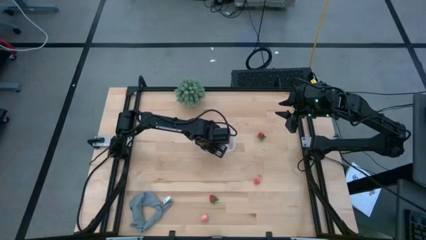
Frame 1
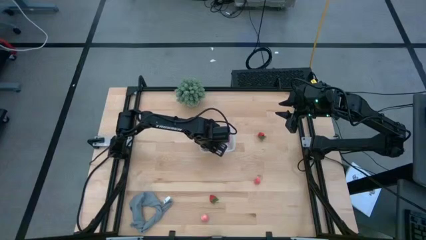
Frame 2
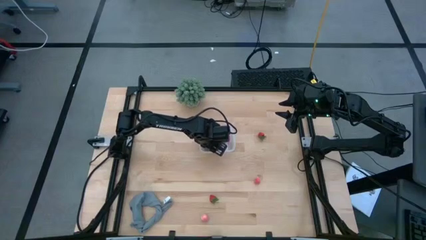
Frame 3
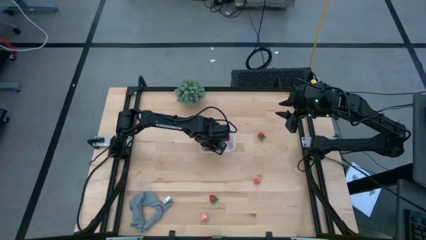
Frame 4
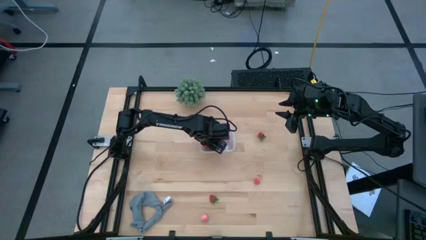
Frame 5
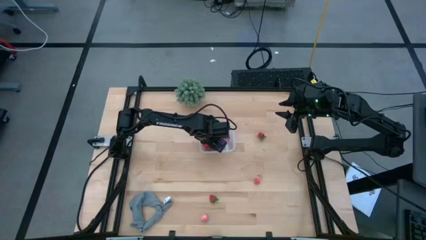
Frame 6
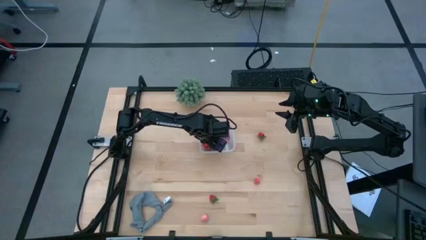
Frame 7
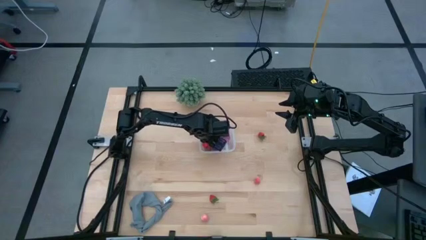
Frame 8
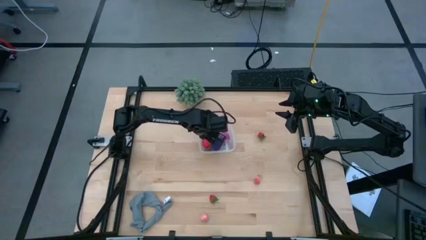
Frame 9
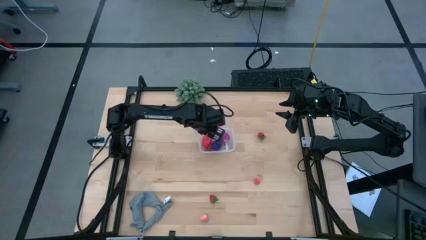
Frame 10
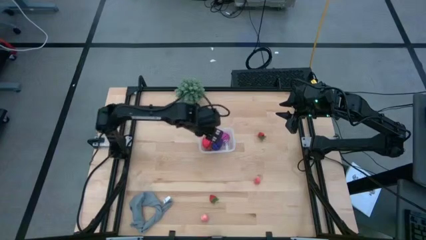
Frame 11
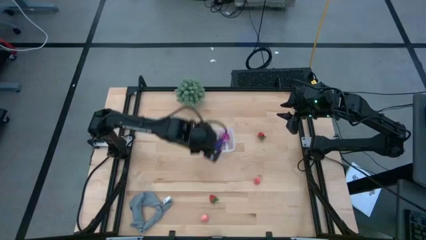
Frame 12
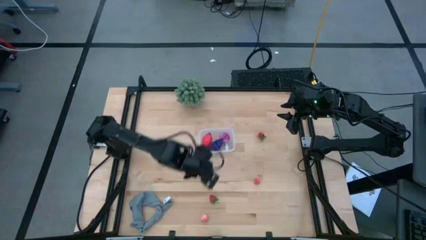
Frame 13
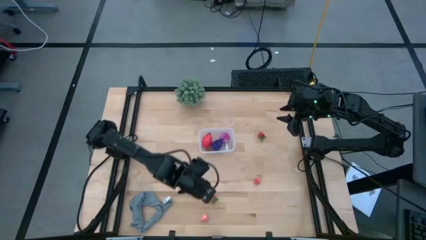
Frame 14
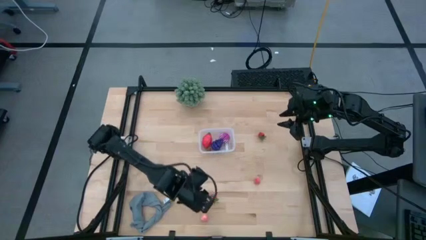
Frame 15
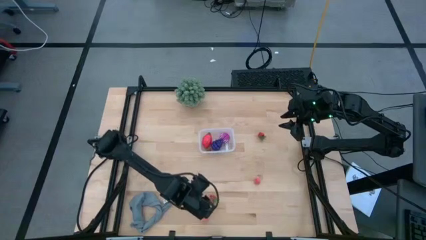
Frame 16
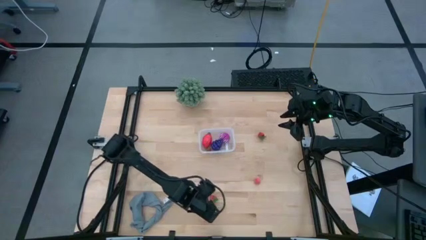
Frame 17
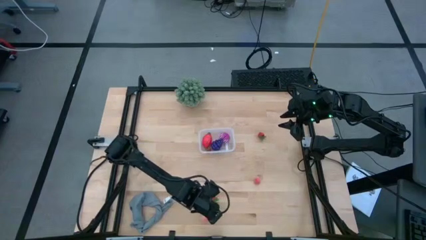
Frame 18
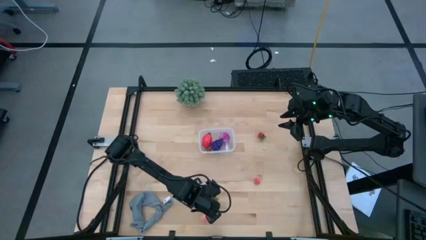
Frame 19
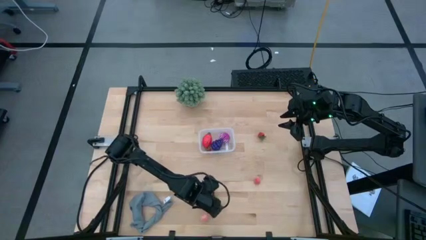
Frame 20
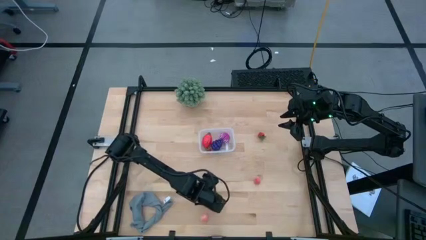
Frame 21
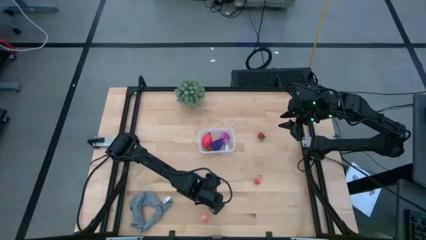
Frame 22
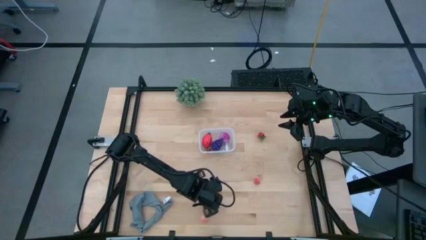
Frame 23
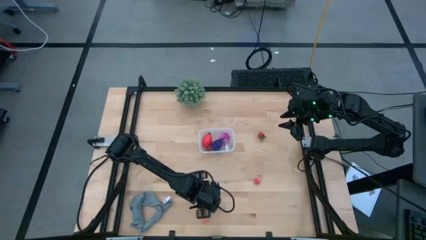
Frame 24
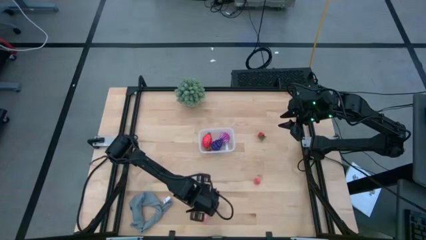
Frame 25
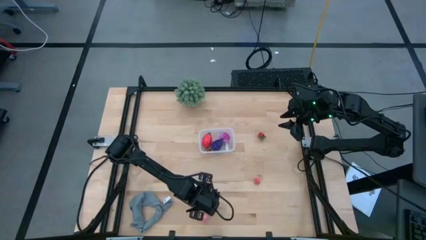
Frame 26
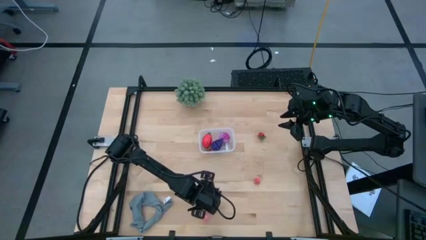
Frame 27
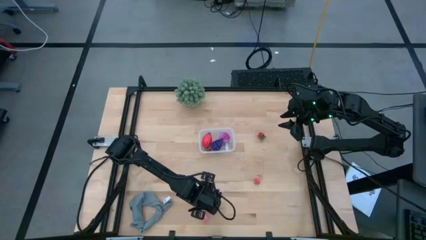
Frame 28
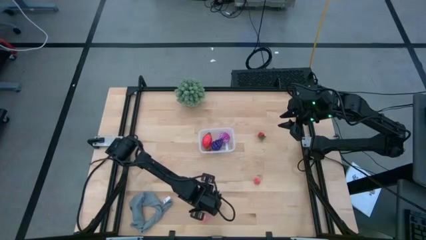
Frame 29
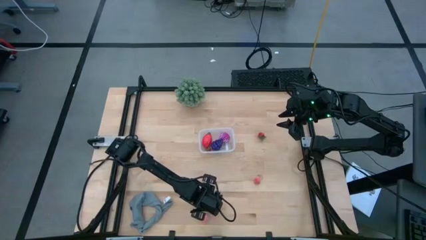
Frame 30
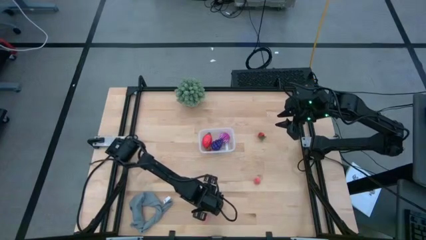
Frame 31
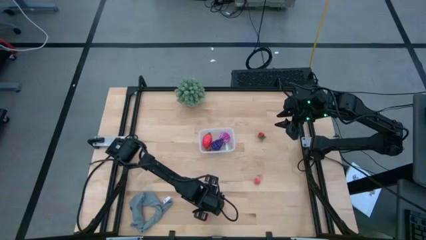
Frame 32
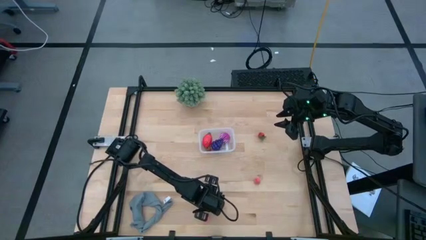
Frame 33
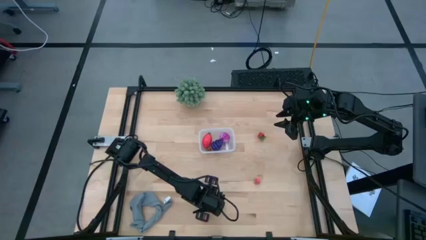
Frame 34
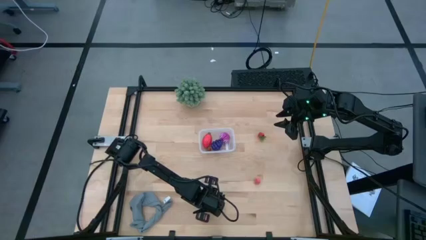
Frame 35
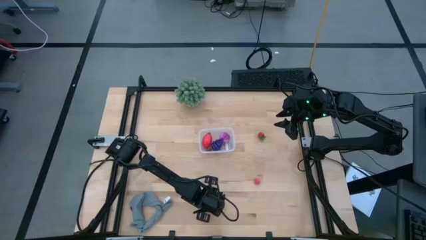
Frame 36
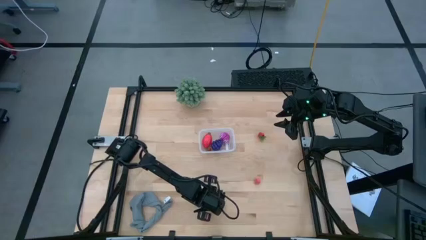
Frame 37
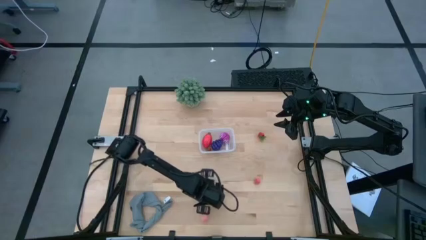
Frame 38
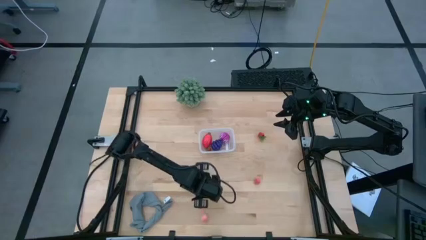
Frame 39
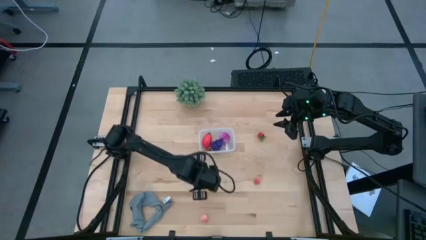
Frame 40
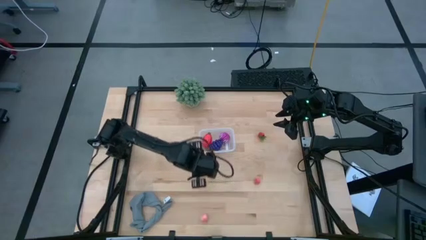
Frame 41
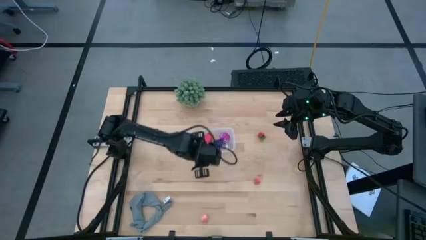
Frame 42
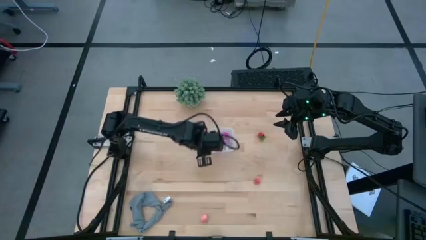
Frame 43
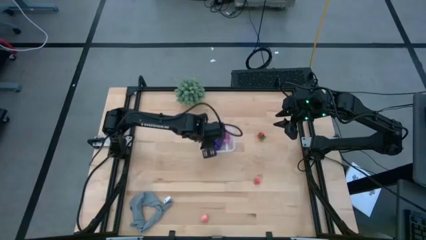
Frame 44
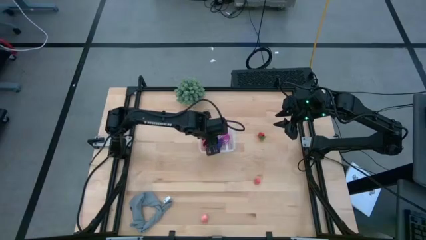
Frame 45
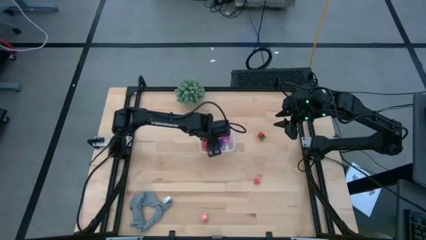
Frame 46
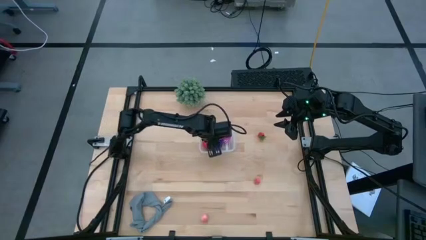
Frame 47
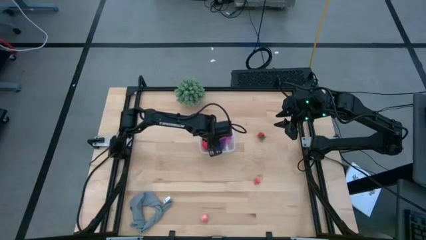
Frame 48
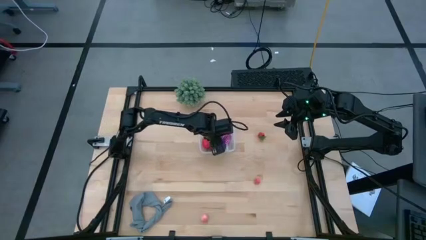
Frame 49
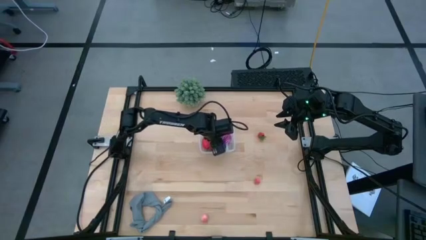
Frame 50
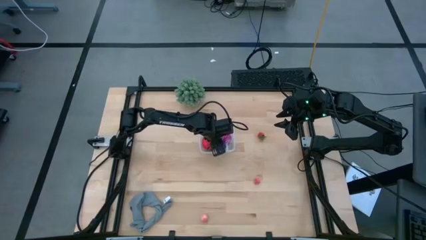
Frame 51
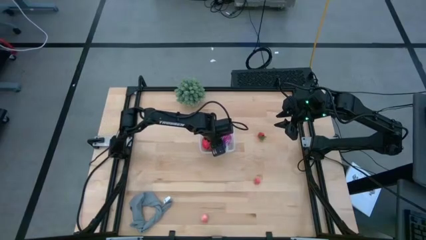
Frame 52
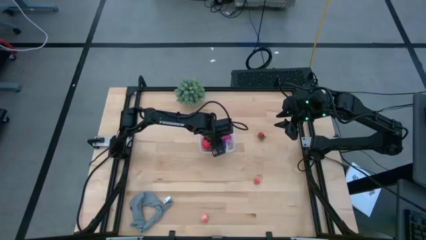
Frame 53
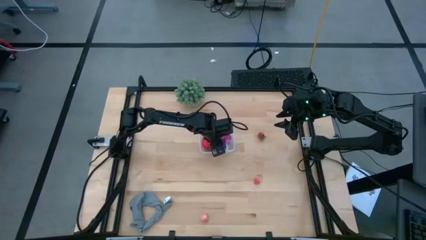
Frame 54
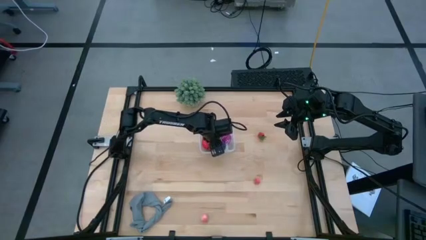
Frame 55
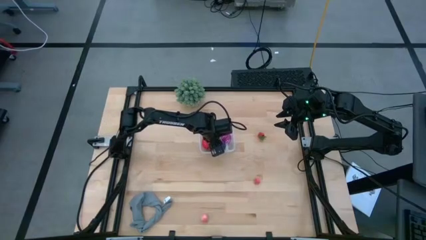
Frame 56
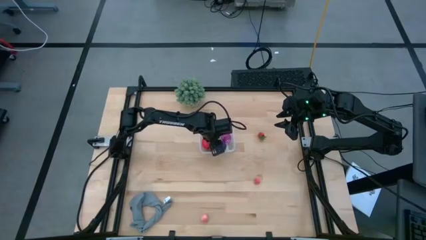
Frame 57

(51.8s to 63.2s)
Task: Pick and placing Produce into tupperware
Put the bottom strawberry into the bin

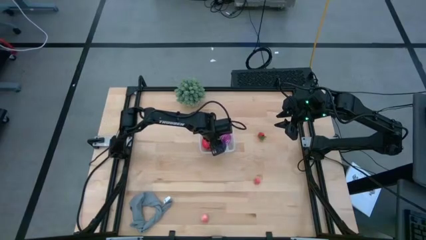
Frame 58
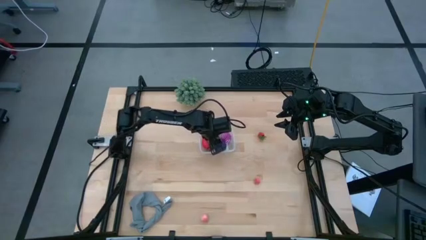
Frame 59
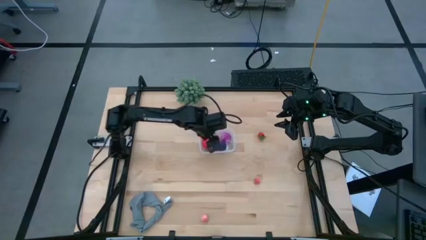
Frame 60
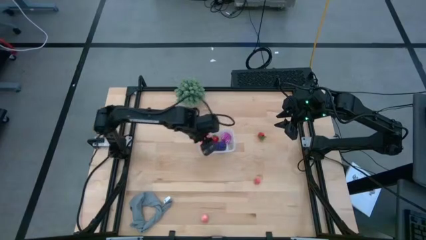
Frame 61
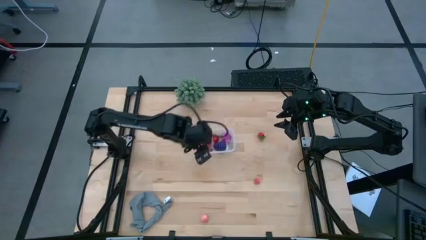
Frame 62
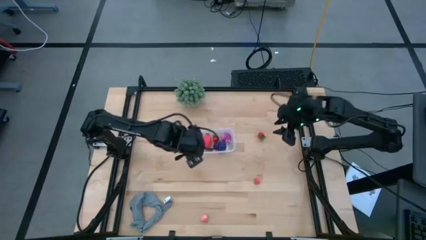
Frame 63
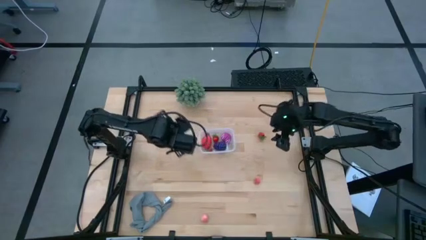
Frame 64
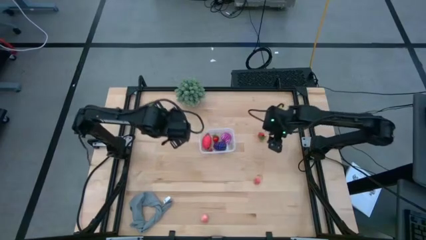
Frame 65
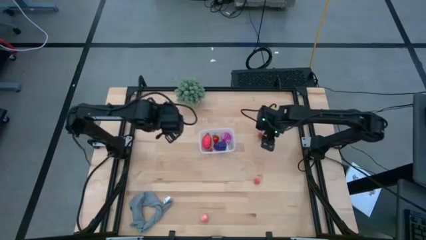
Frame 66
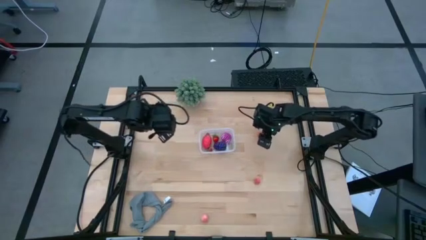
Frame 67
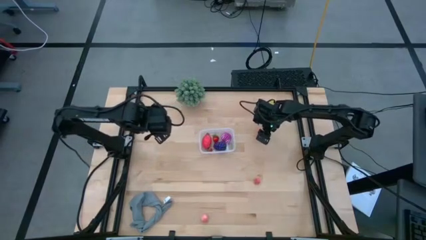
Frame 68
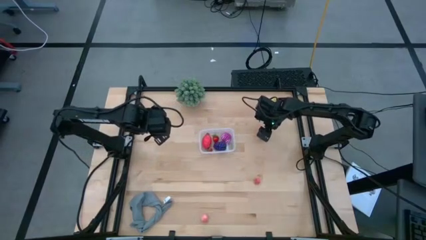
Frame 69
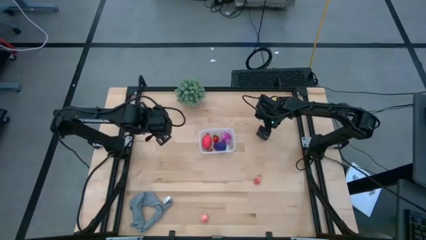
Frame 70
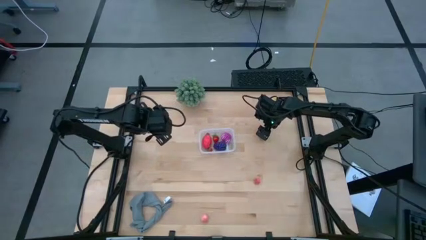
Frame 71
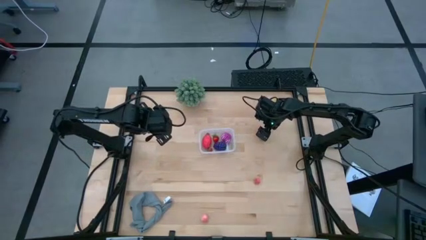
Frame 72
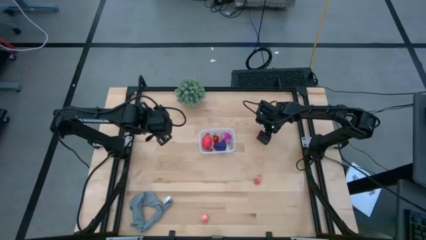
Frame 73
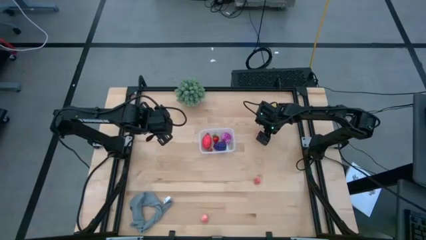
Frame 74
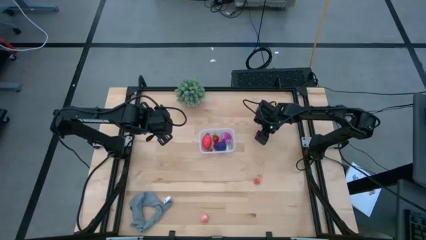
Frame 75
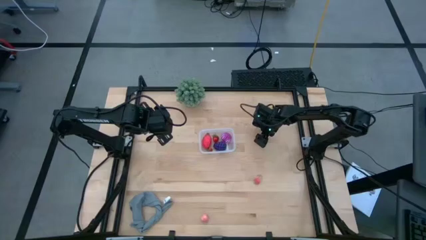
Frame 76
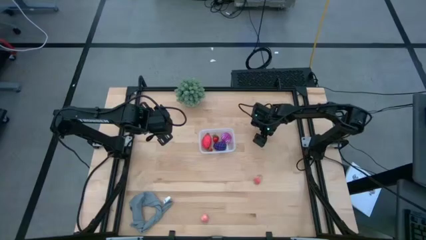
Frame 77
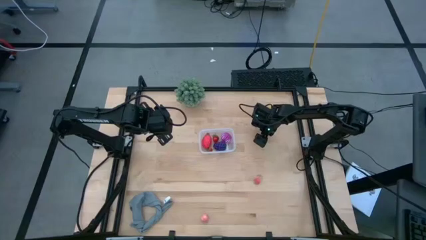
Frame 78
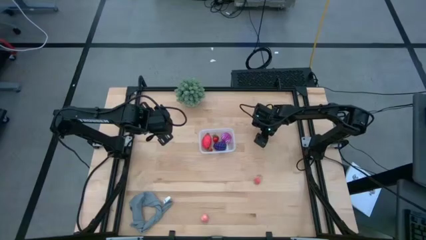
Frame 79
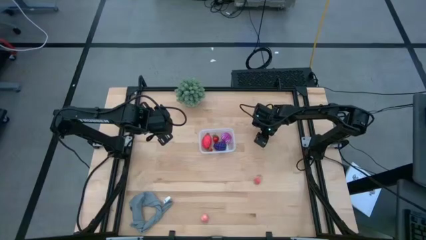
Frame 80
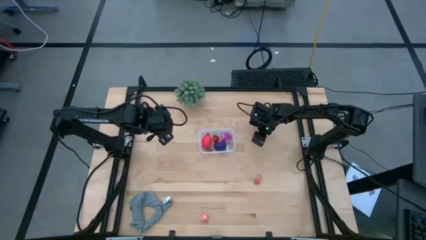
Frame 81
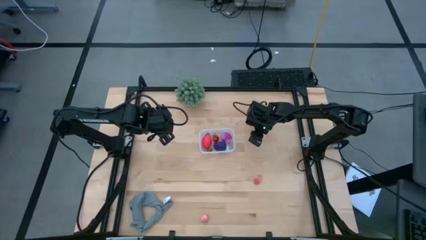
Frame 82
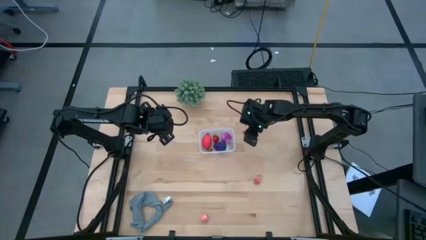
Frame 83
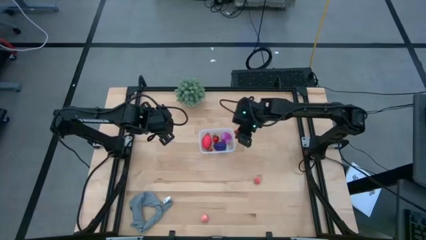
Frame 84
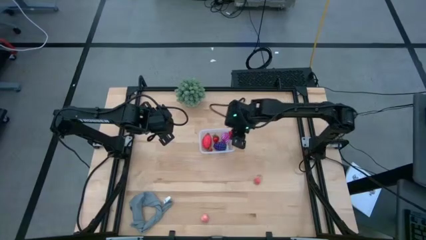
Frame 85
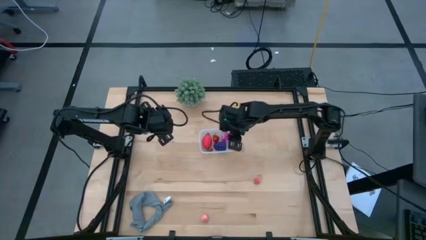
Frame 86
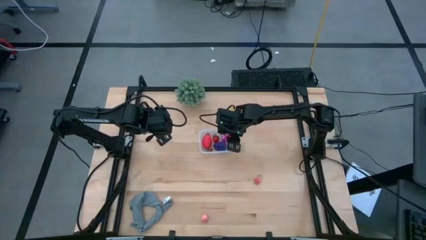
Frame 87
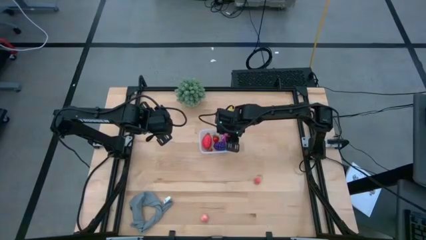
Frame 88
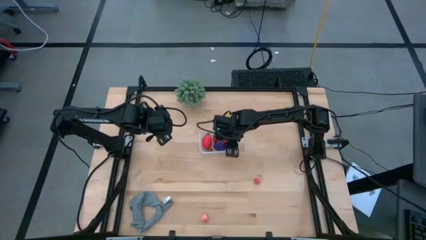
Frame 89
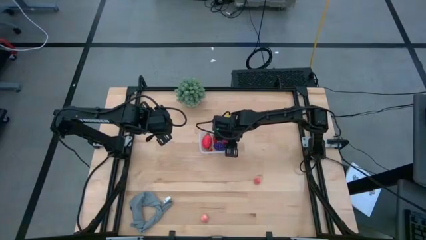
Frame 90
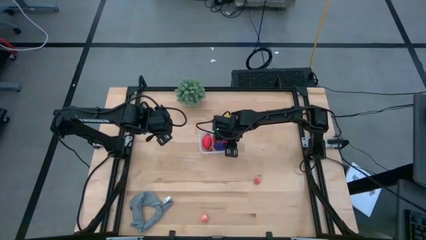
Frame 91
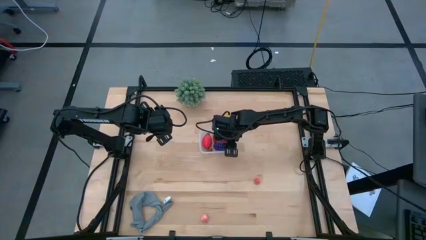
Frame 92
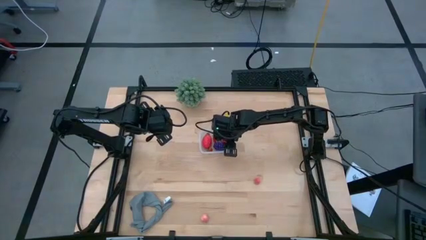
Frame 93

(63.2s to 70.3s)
Put the strawberry into the bin
